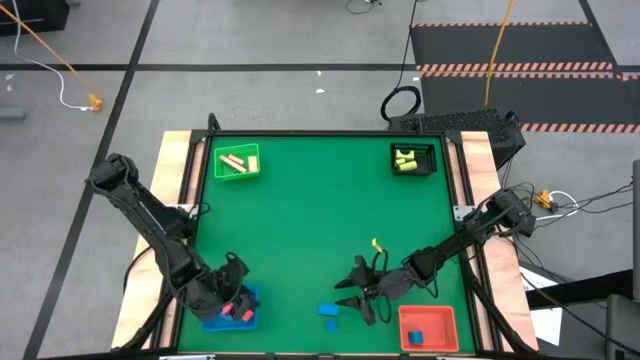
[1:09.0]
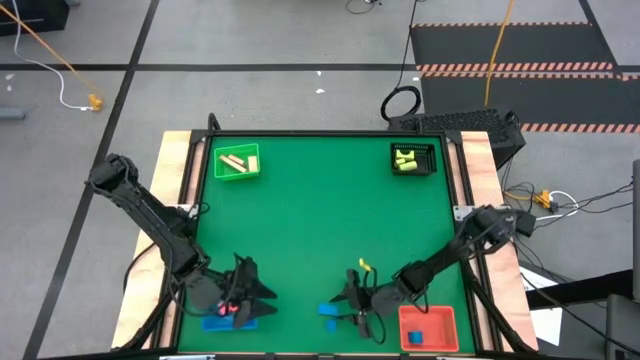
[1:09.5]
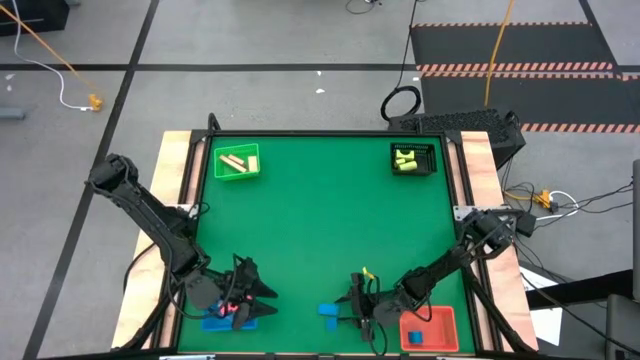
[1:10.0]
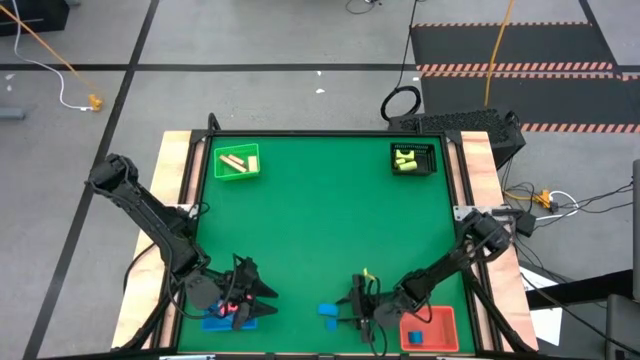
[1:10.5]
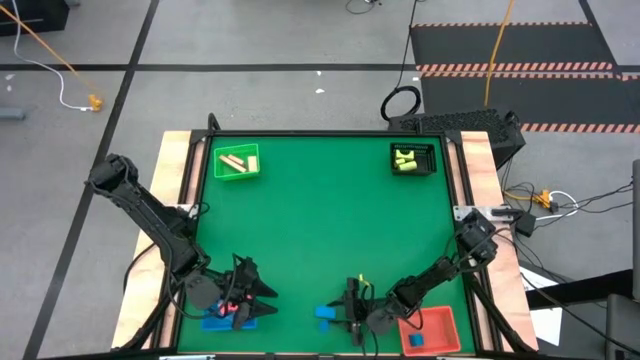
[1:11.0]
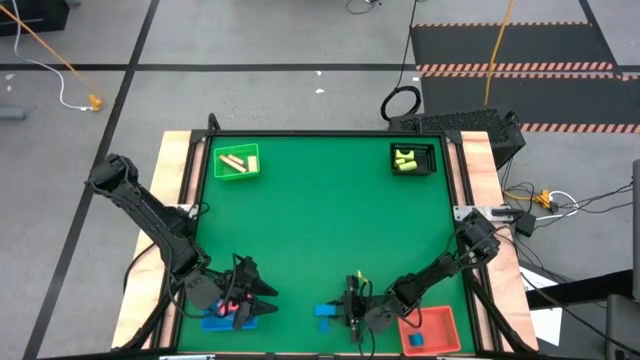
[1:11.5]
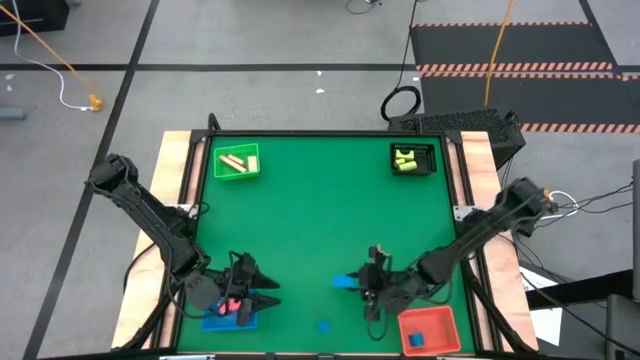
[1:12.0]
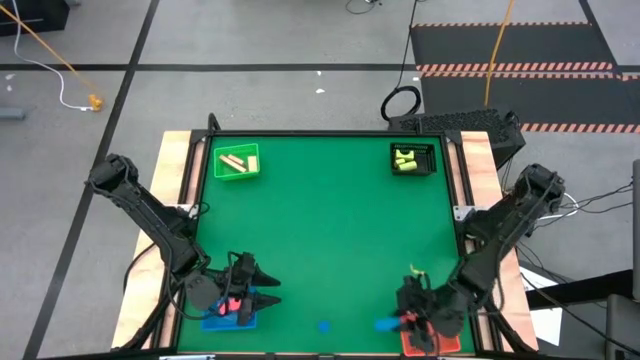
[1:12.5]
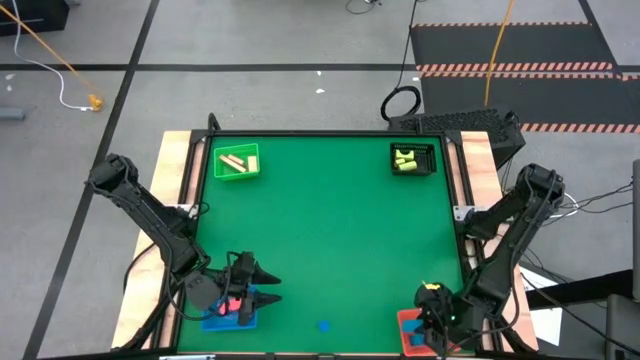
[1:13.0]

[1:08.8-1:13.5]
Task: Sort & place blocks by color
Put the top blue block into the orange bin

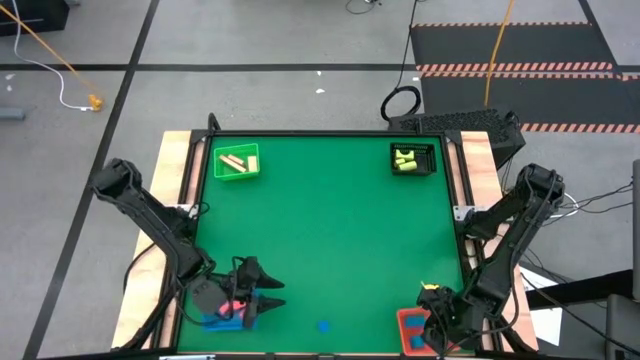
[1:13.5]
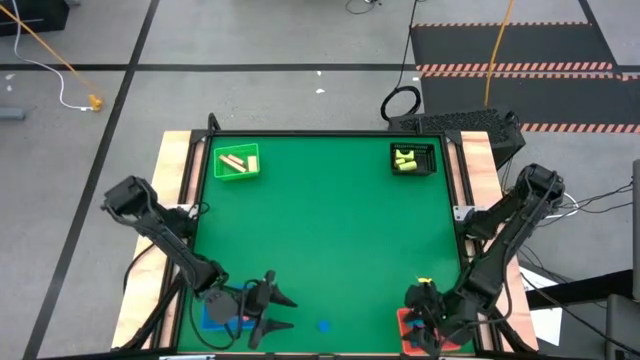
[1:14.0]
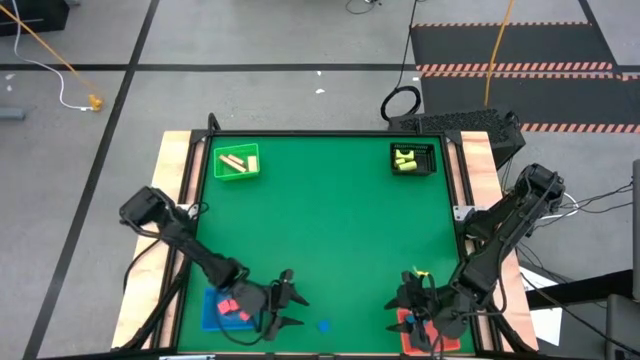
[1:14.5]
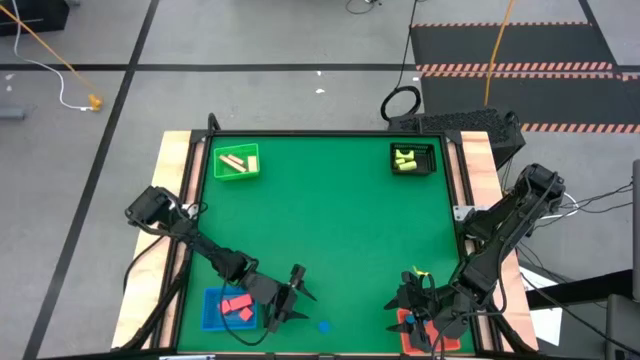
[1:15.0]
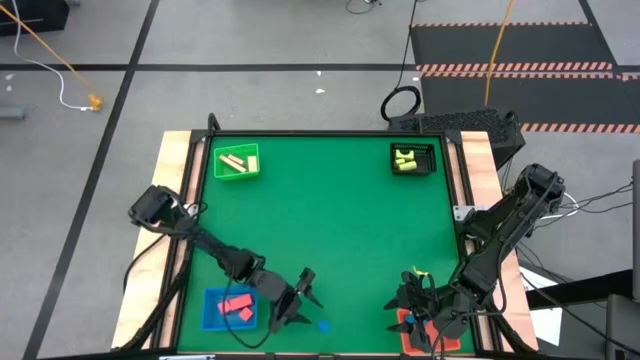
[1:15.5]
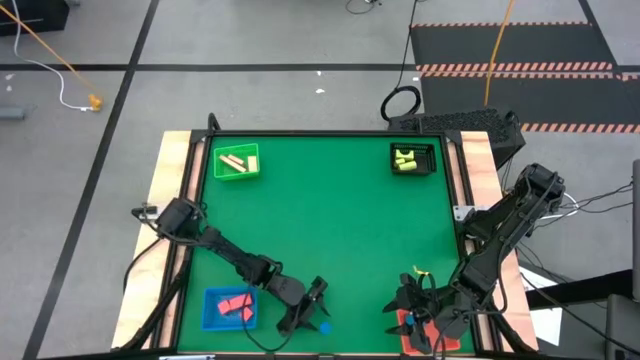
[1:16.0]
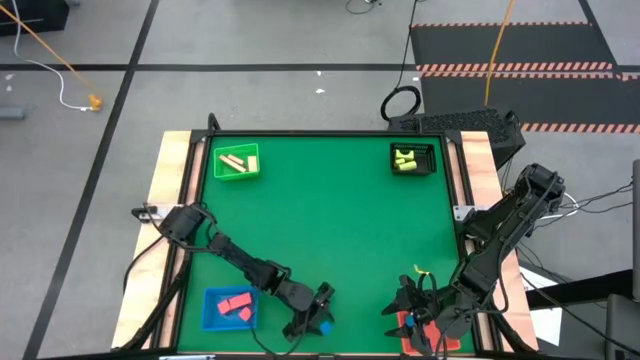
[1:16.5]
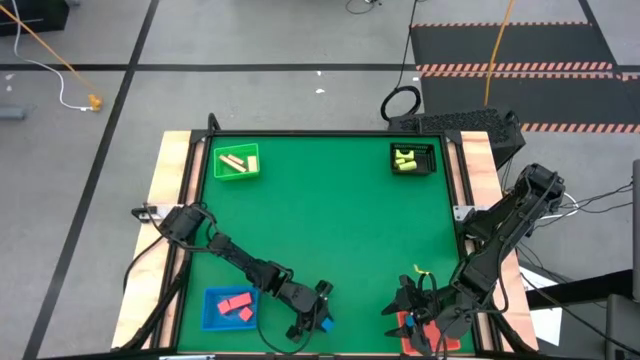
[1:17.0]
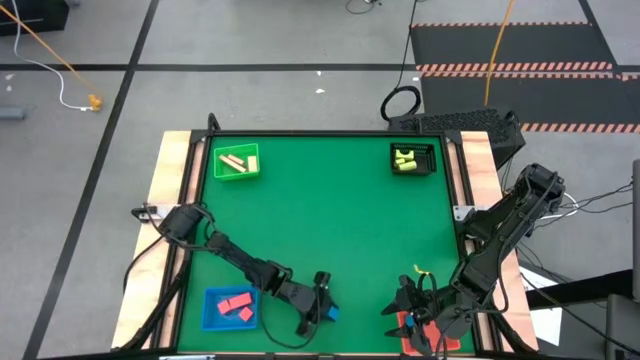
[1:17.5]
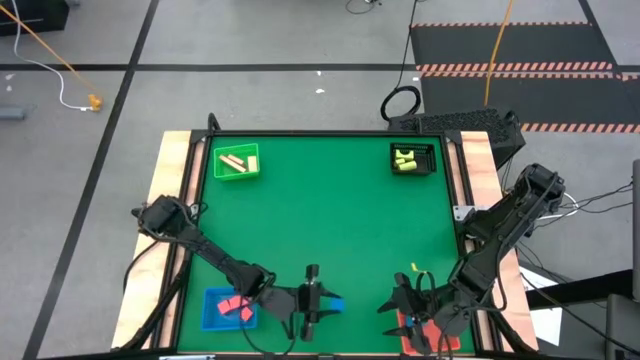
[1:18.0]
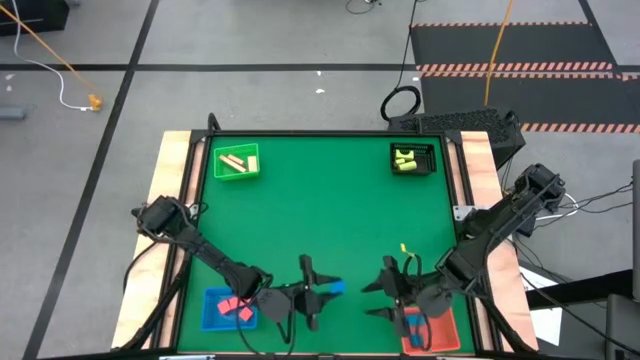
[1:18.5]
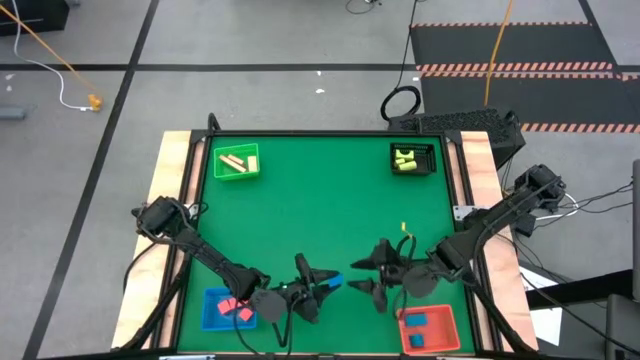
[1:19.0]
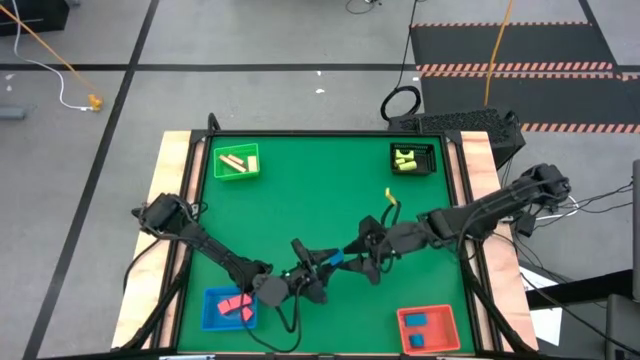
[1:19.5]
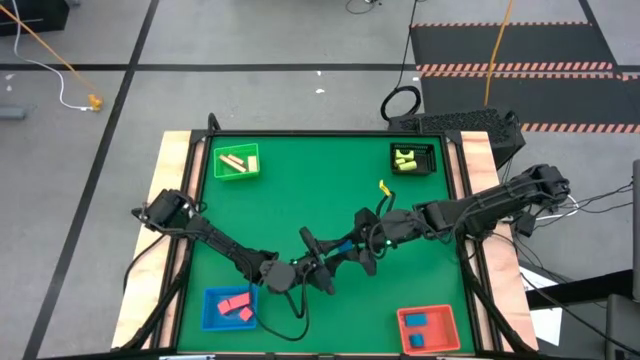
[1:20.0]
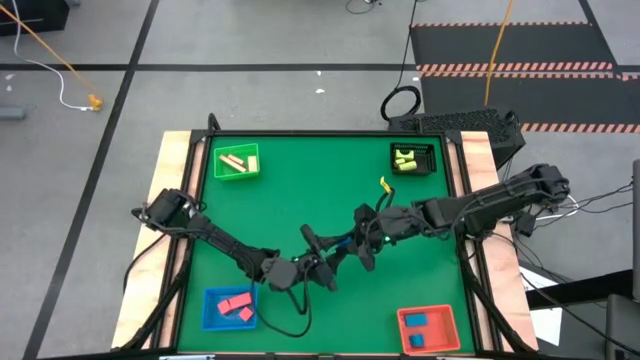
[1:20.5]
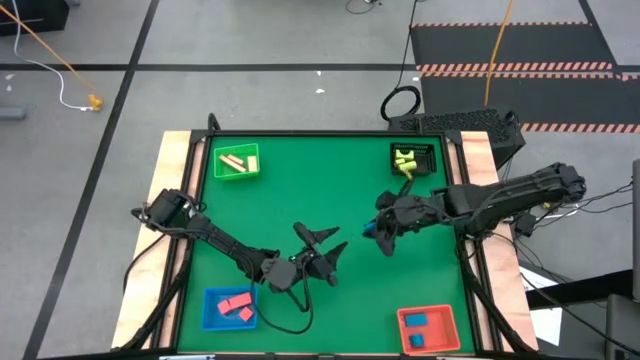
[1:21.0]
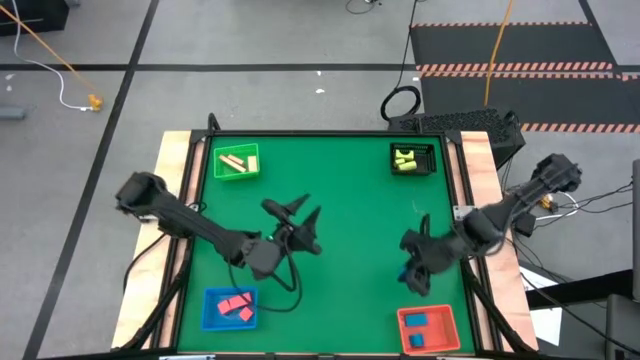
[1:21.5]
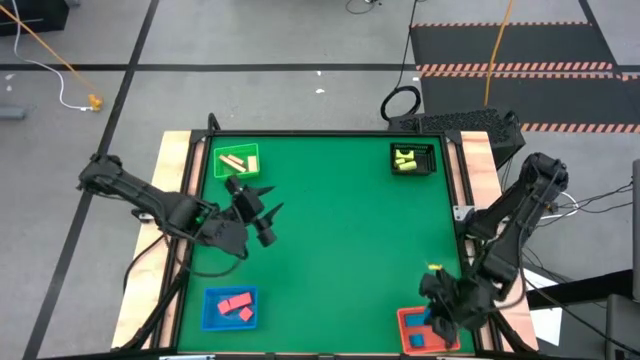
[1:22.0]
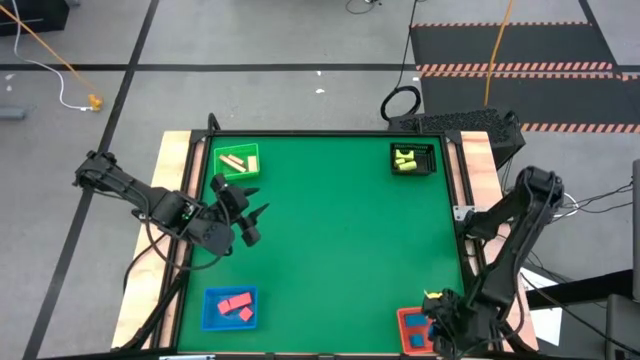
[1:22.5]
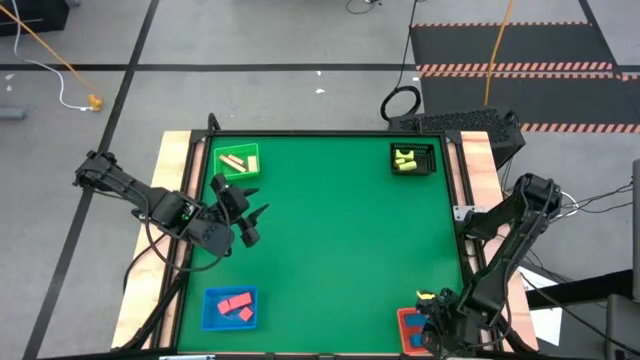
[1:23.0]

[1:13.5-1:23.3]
Put the blue block into the orange bin

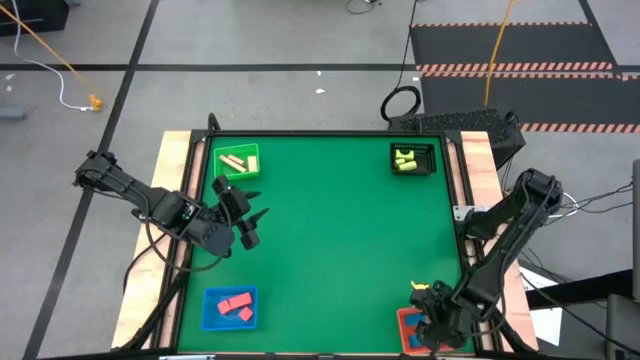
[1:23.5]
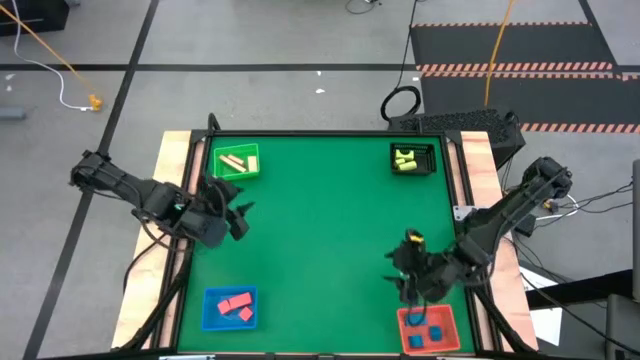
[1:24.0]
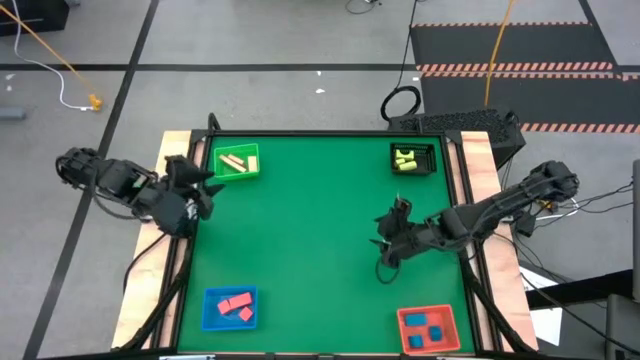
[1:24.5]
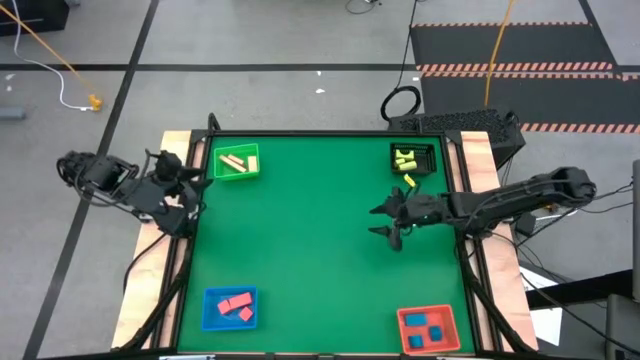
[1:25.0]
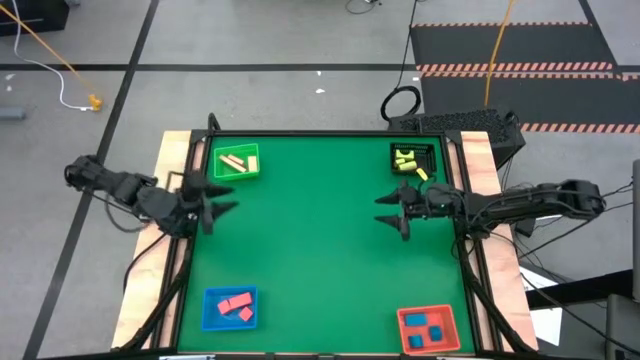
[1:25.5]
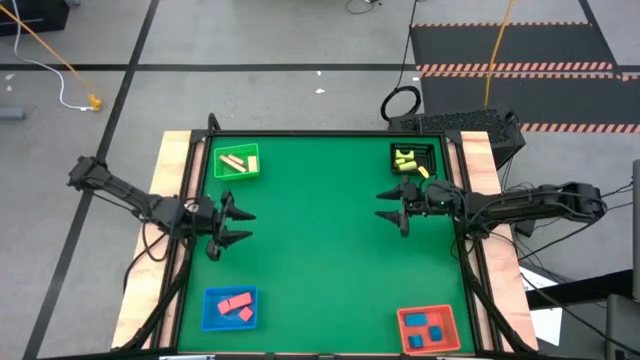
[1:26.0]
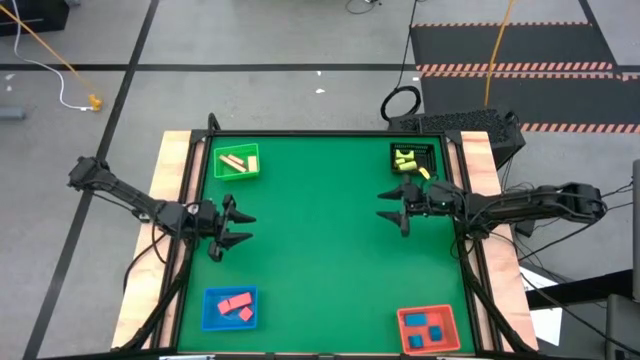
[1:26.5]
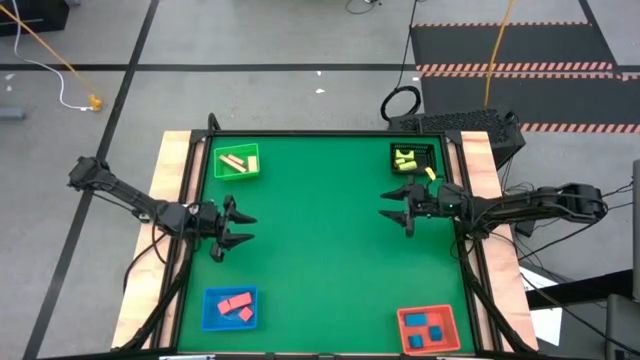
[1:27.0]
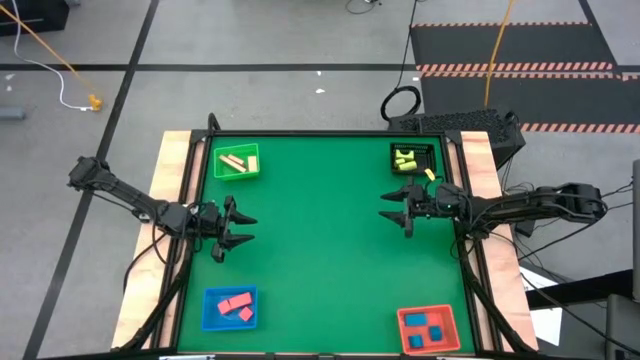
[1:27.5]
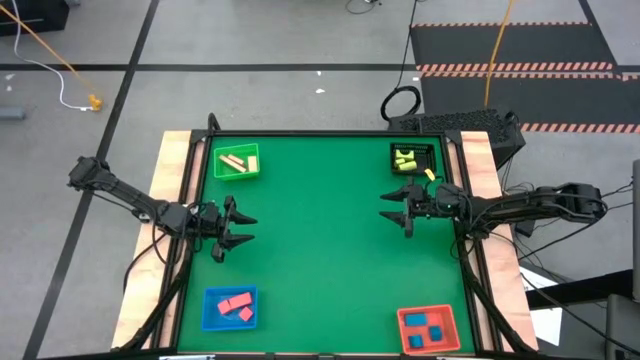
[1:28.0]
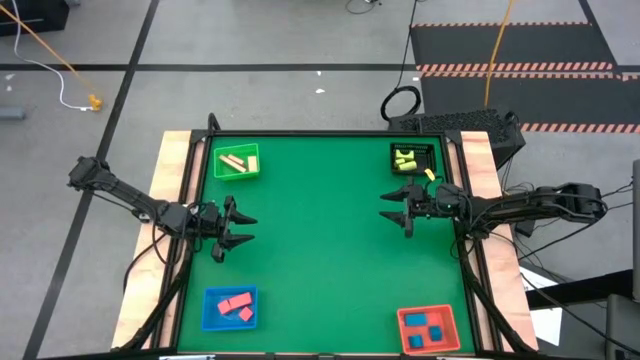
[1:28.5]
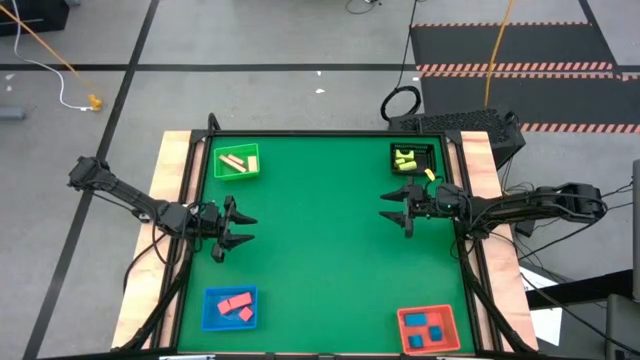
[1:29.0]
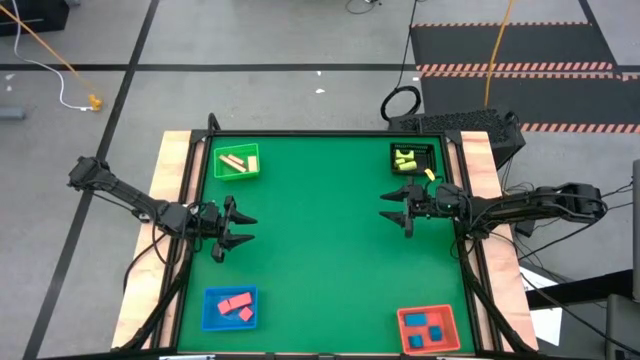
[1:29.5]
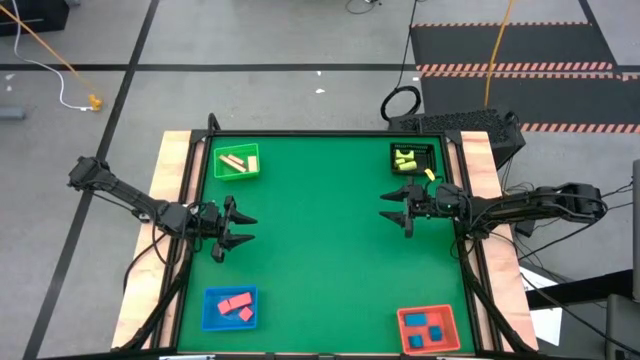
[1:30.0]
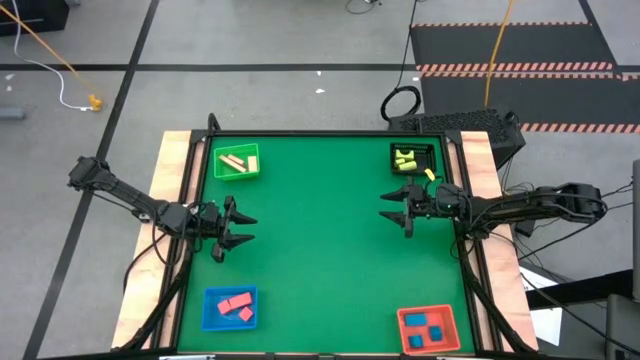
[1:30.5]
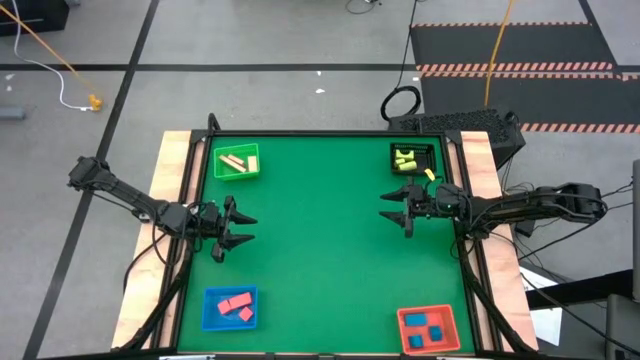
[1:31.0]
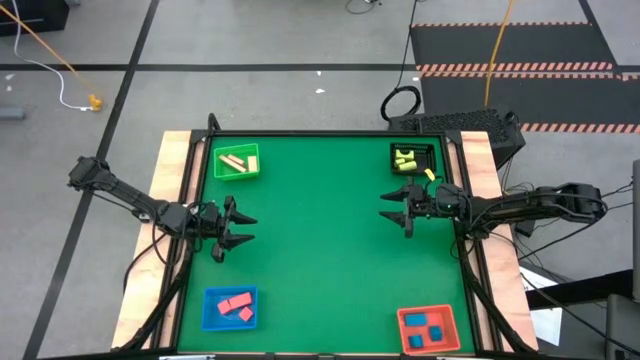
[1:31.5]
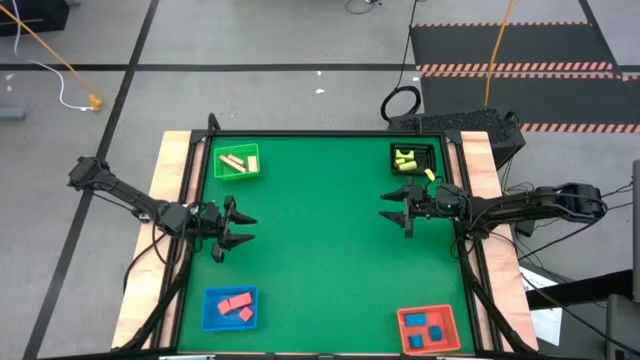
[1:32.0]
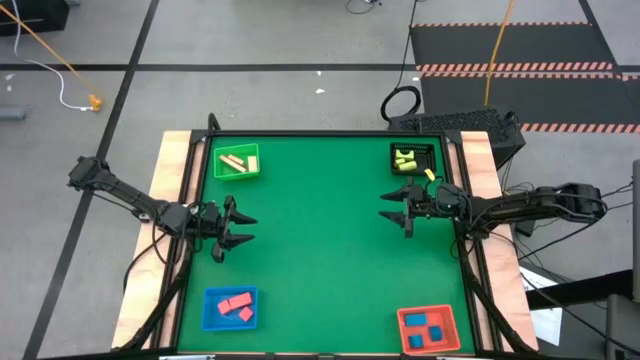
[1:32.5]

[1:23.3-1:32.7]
Return to Home Position
